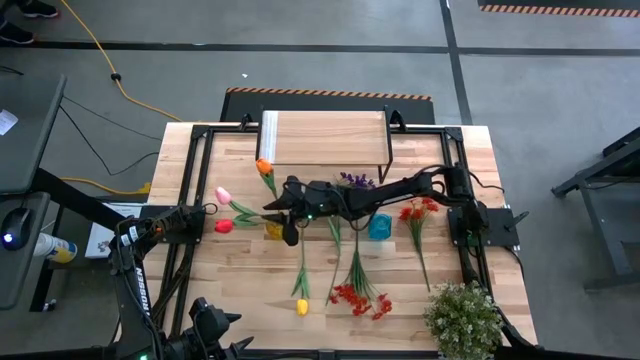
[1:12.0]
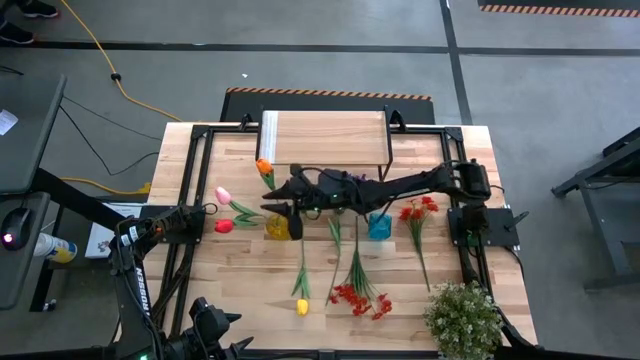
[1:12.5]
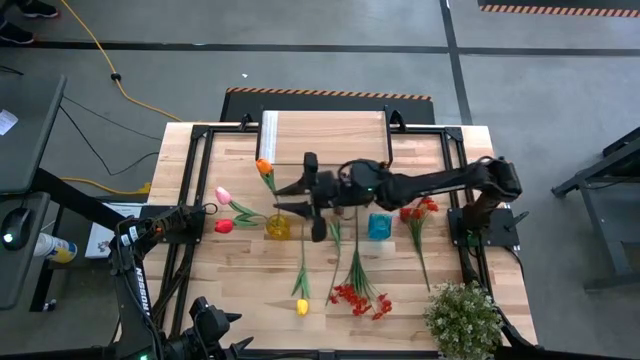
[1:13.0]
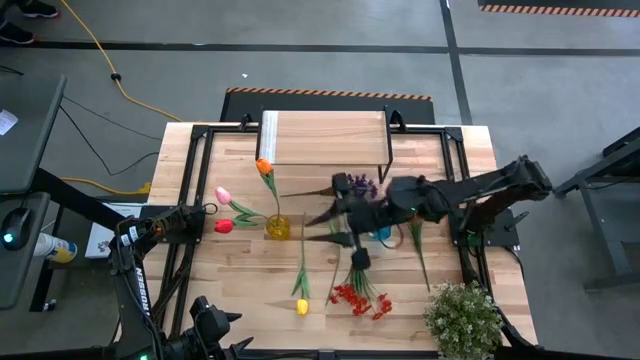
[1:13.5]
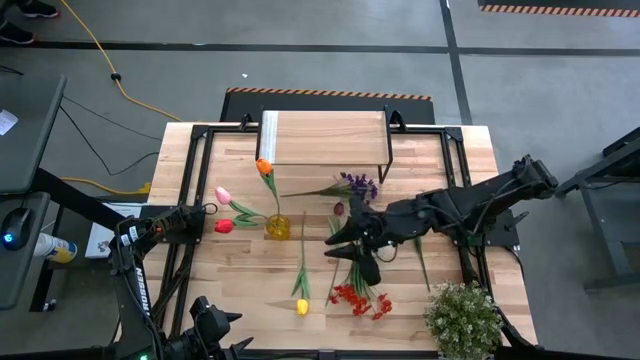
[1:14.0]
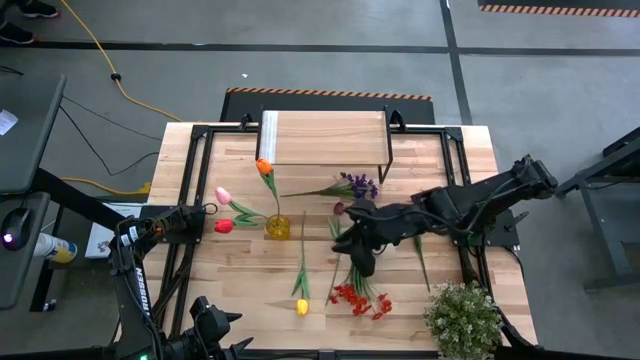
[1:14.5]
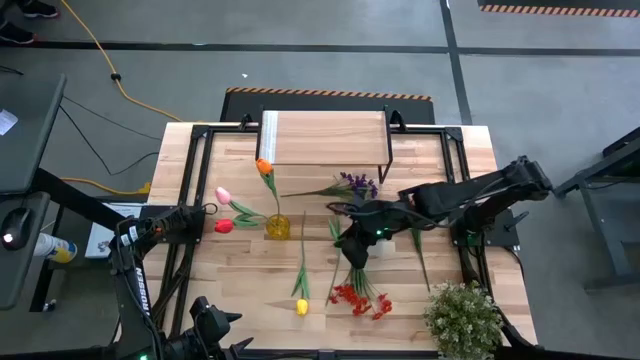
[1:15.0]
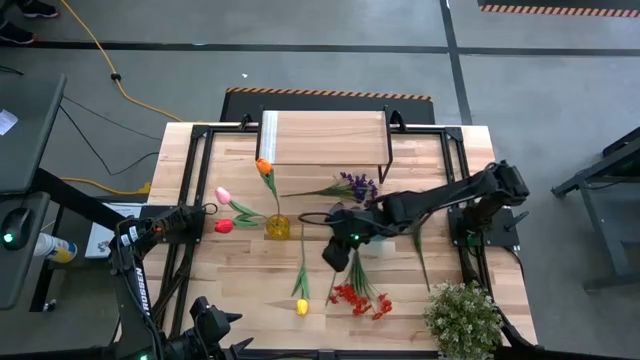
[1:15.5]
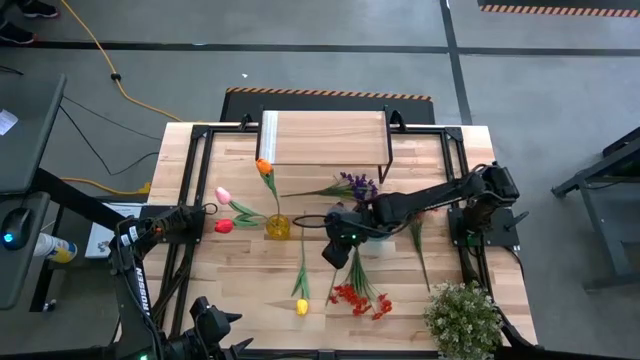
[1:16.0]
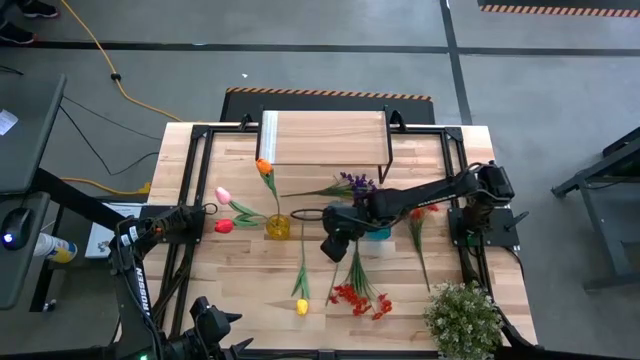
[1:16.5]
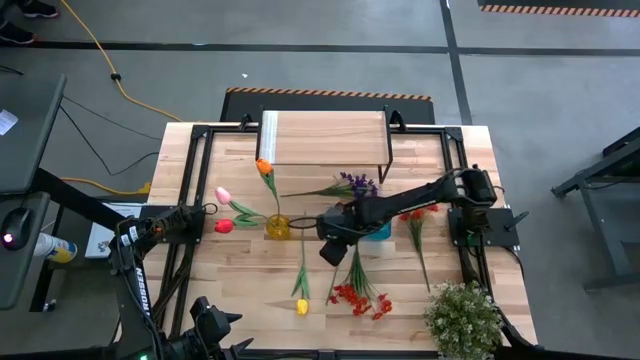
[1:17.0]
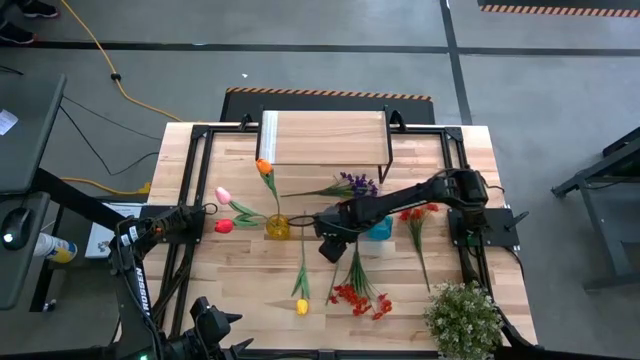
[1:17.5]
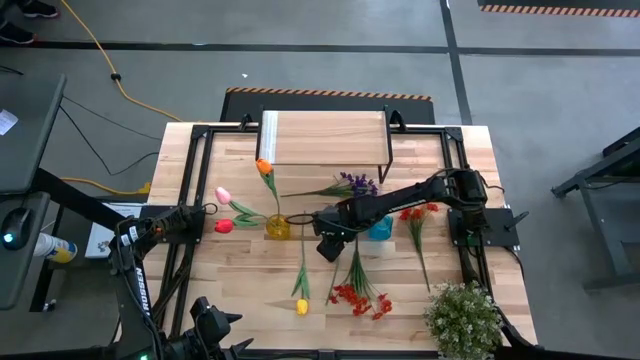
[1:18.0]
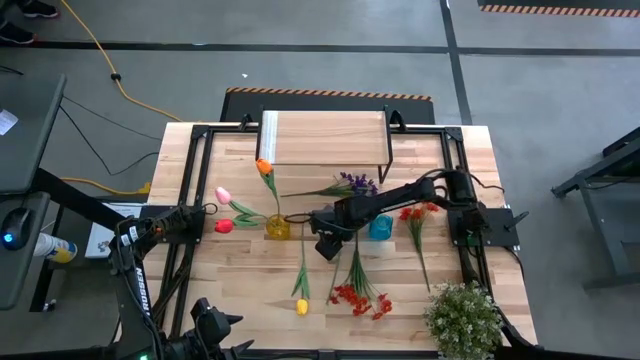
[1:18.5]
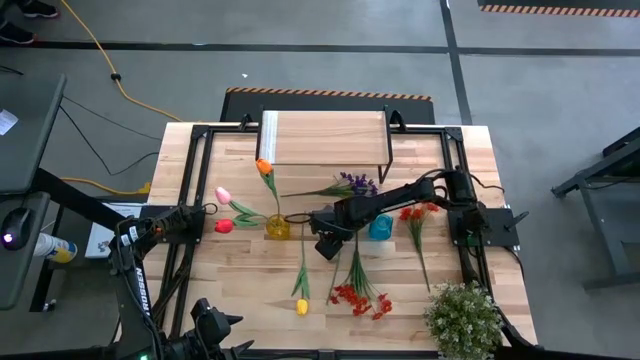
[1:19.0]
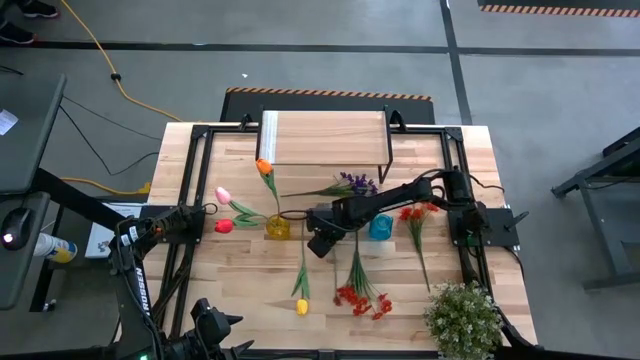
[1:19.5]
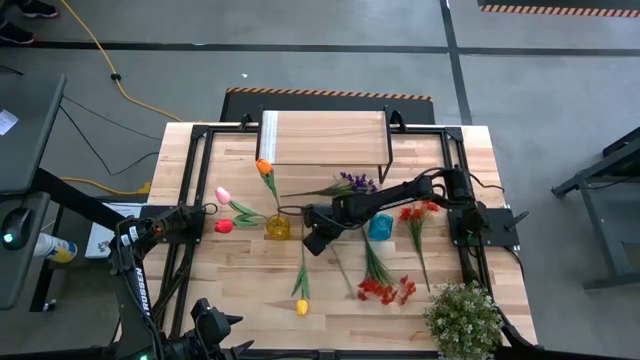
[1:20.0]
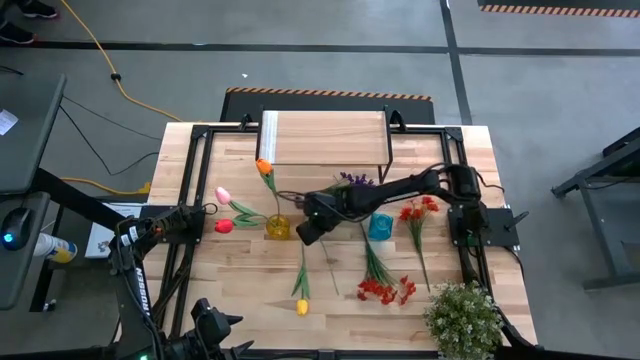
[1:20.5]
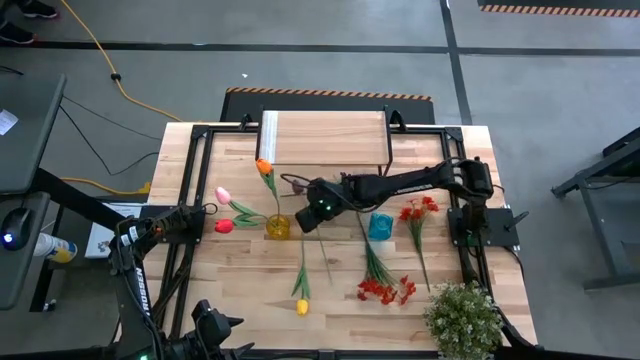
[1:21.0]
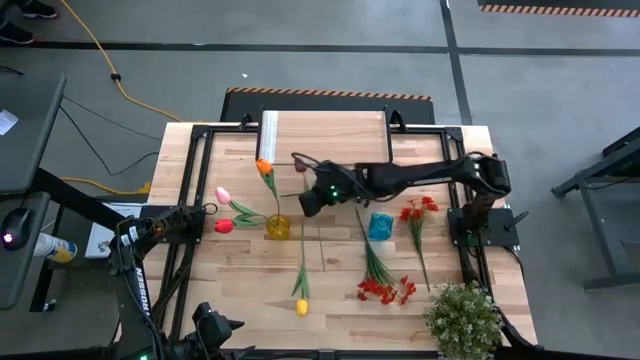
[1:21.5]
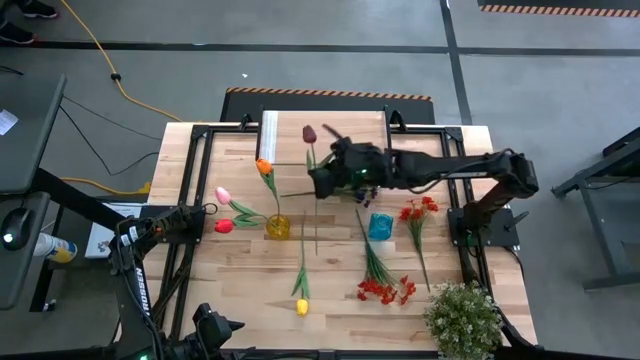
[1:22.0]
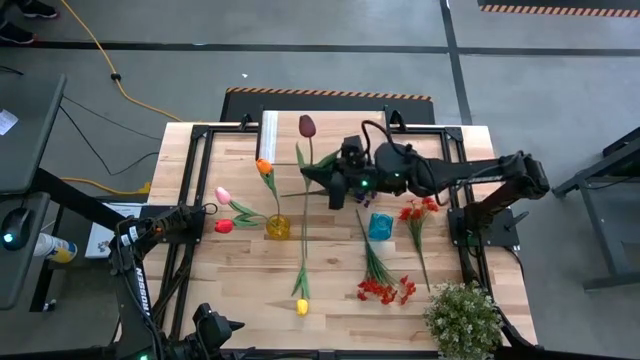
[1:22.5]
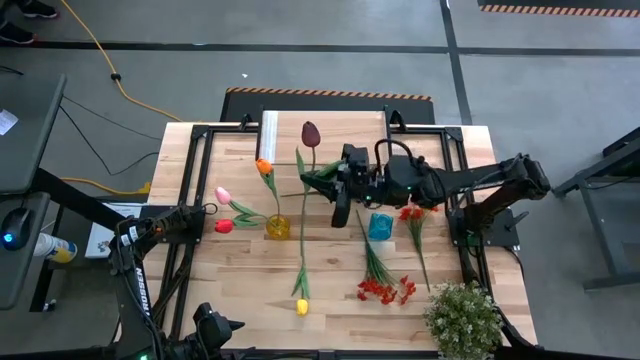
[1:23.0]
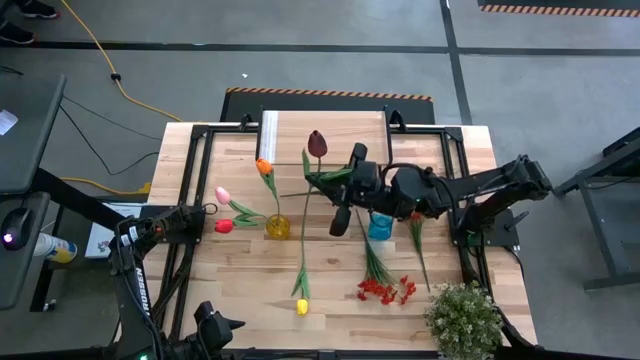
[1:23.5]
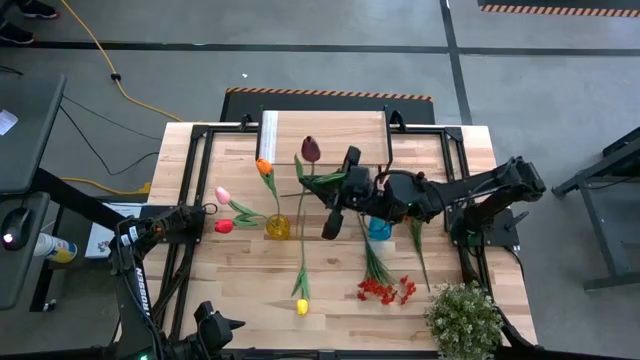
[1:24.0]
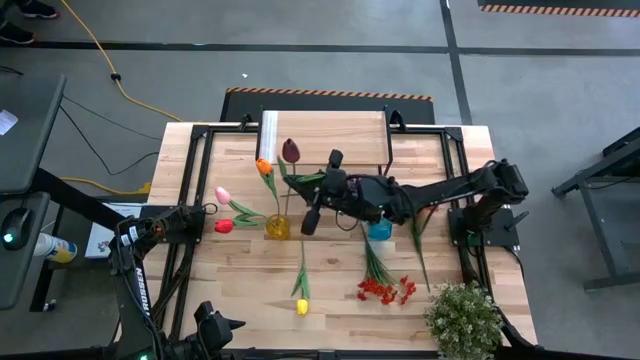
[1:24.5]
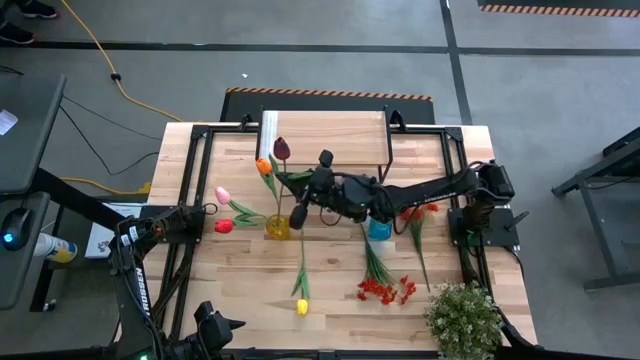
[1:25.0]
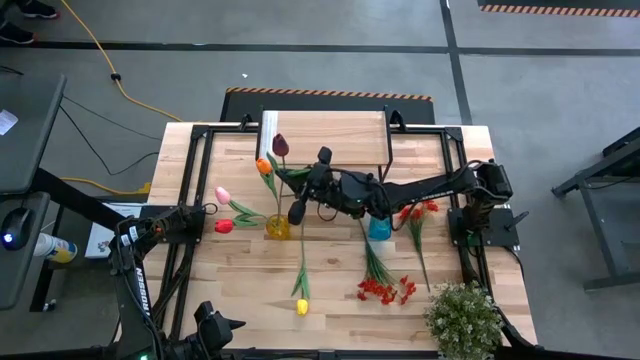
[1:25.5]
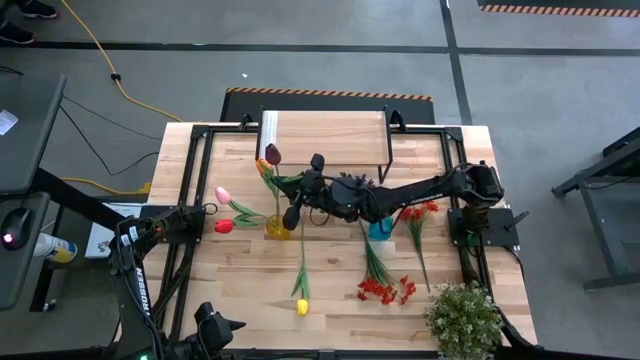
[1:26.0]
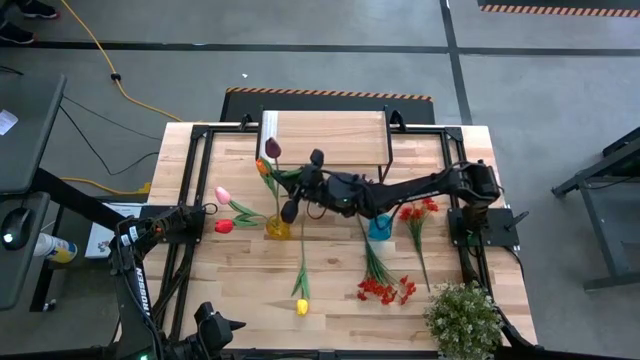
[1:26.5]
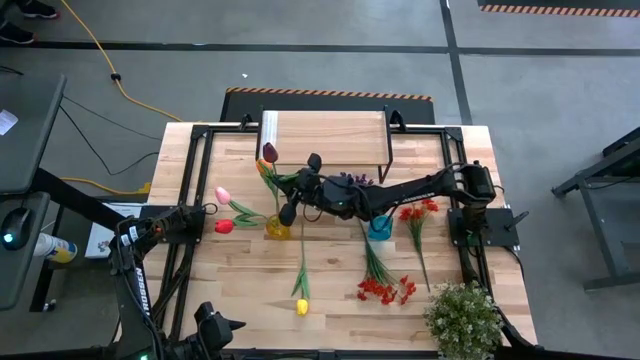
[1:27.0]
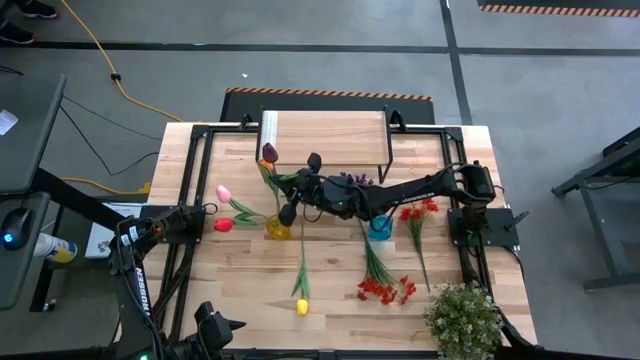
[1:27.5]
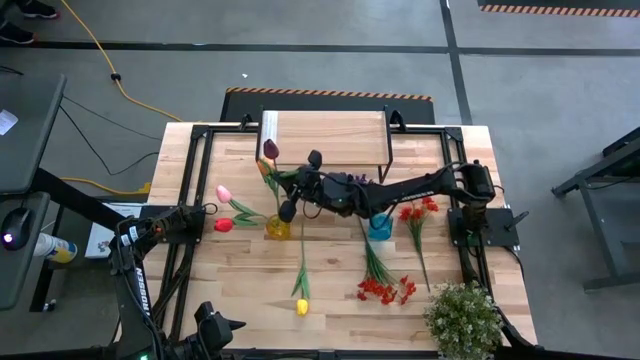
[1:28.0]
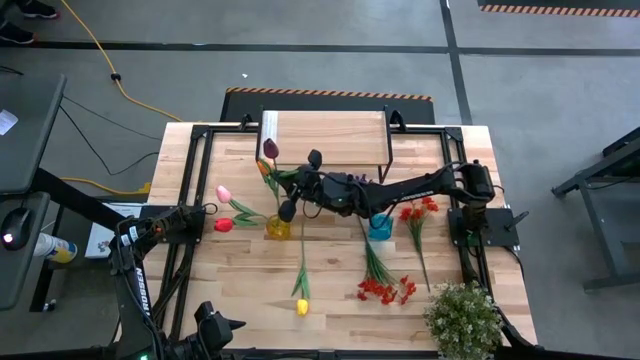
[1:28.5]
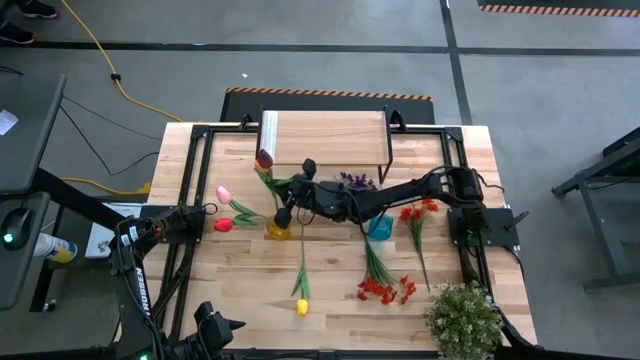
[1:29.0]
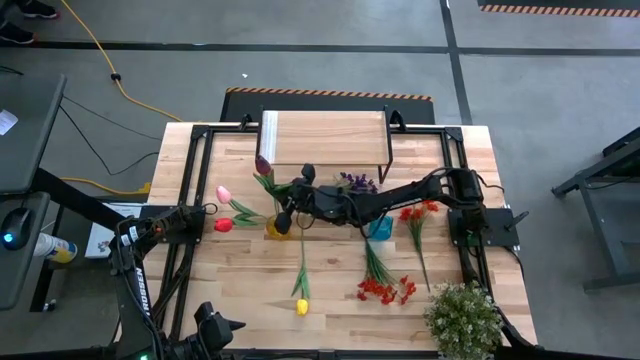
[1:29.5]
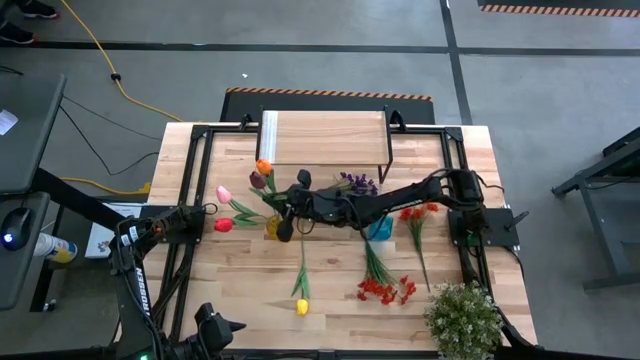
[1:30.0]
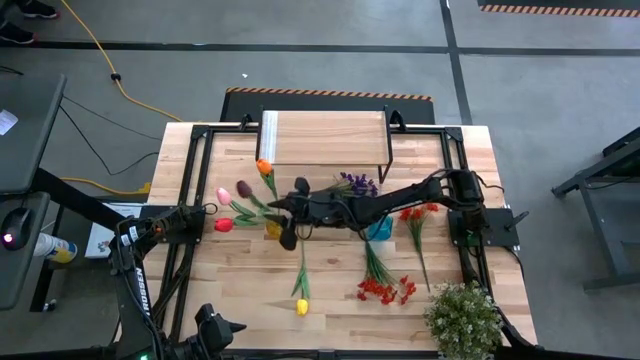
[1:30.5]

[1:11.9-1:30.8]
Task: Pick and place flowers into a vace then onto a shelf
Put the dark red tulip into the yellow vase

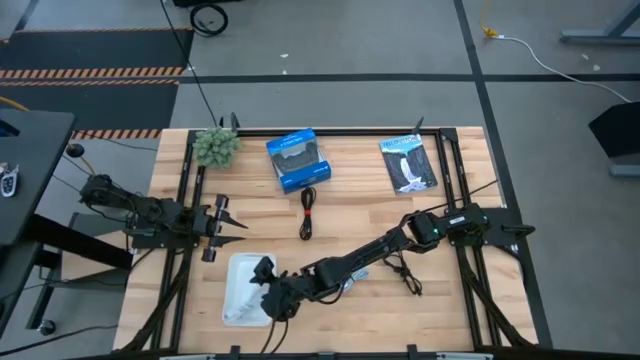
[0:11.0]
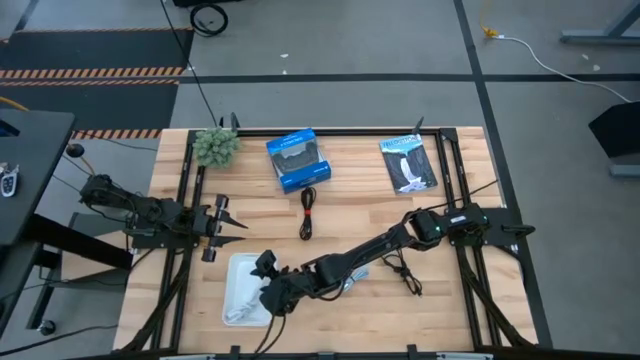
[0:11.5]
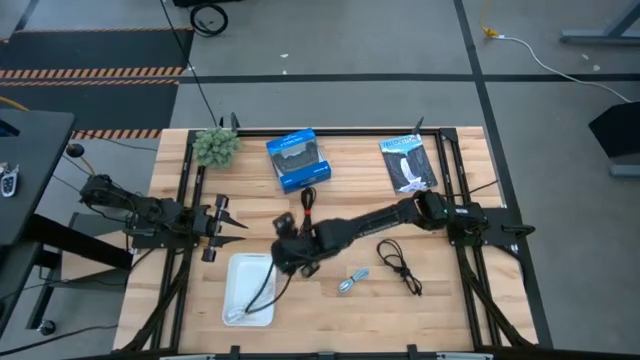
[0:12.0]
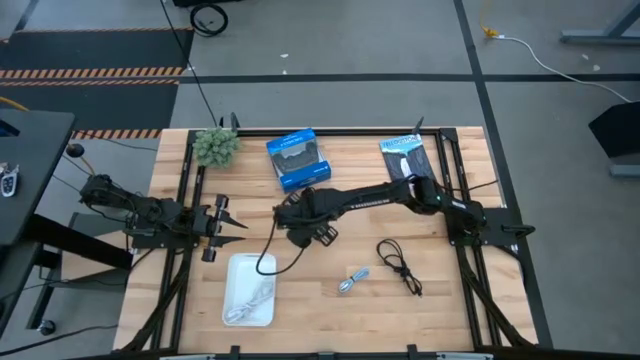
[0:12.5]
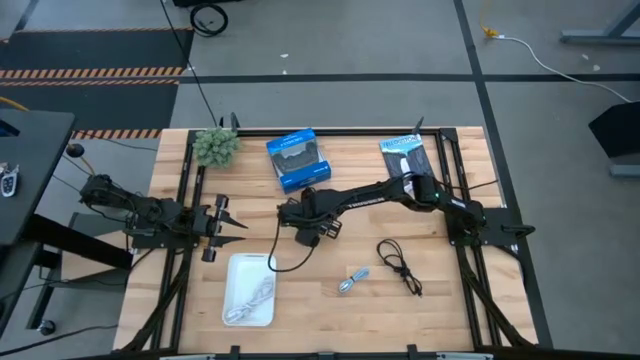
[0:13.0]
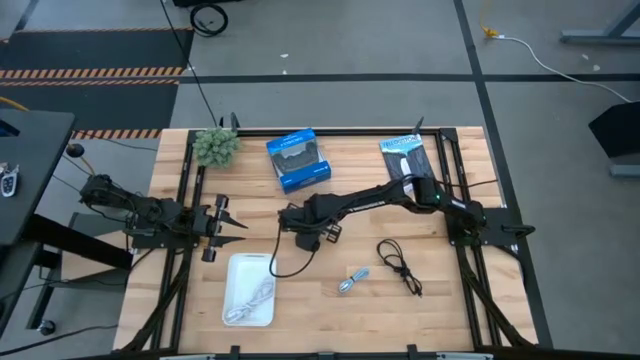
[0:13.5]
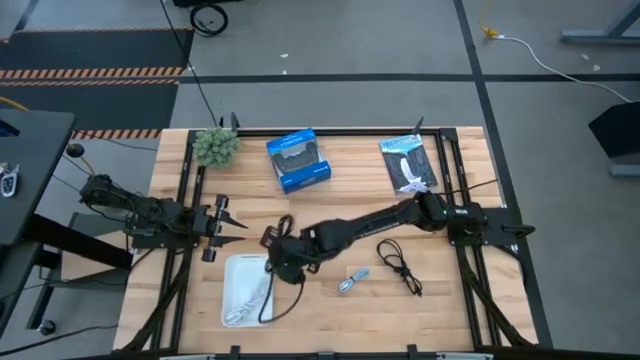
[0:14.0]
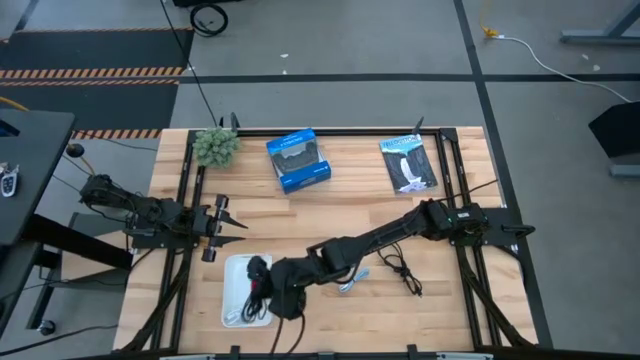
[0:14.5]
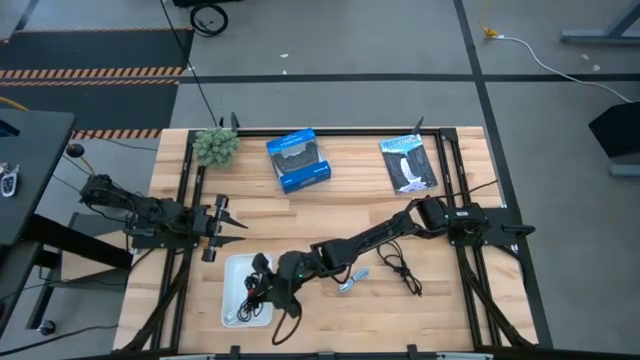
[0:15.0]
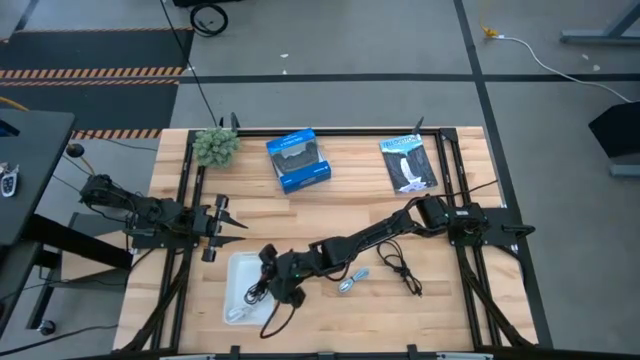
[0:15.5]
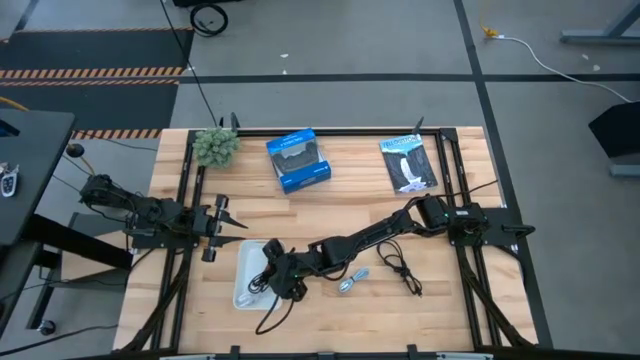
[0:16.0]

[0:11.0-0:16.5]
Task: Pick and place USB-C Cables
Put the left black charger cable into the white bin
